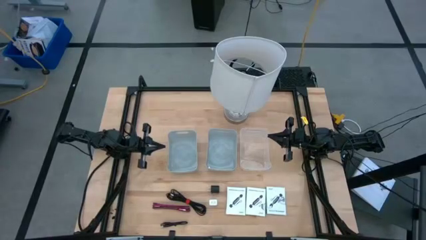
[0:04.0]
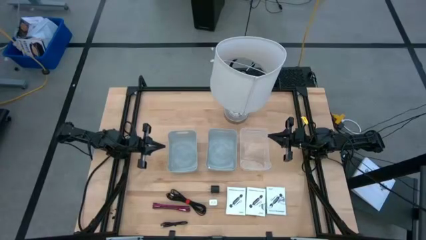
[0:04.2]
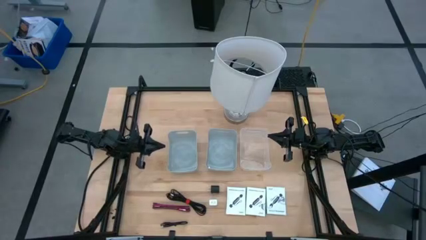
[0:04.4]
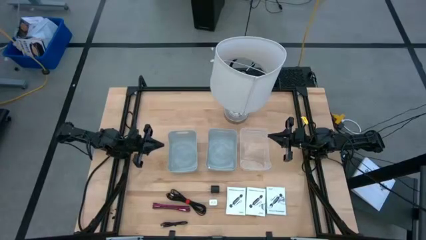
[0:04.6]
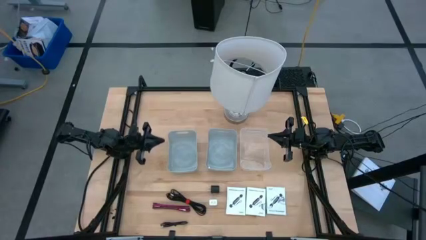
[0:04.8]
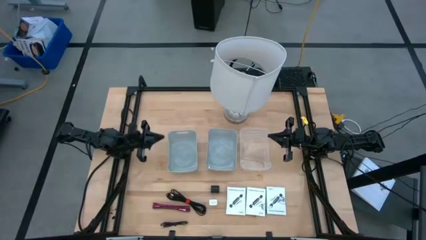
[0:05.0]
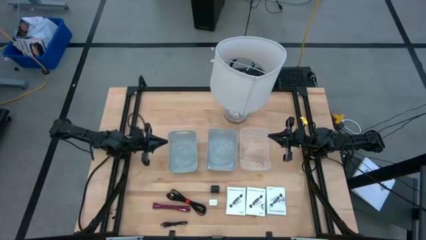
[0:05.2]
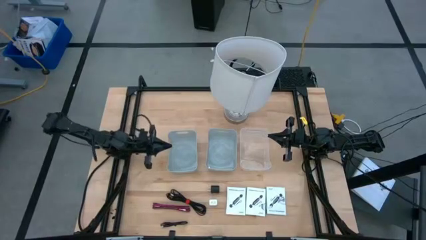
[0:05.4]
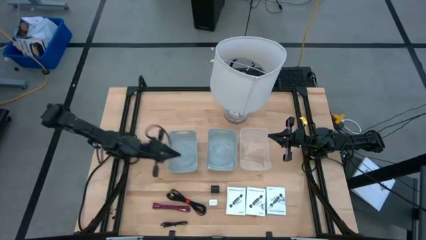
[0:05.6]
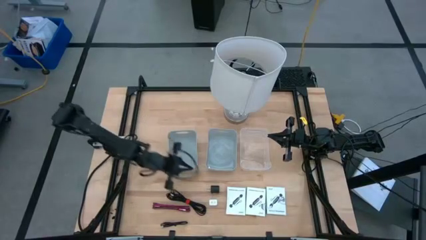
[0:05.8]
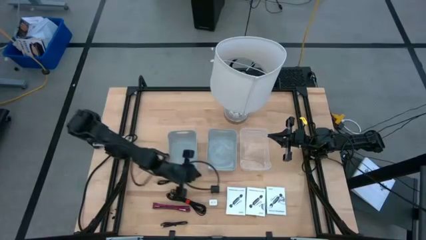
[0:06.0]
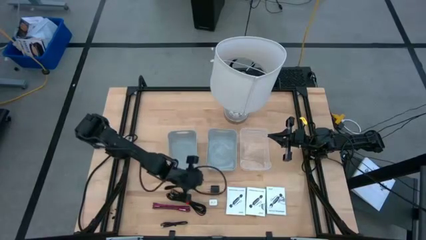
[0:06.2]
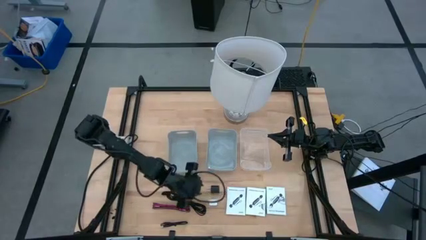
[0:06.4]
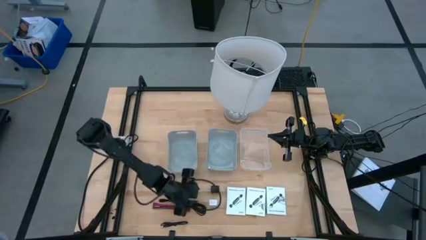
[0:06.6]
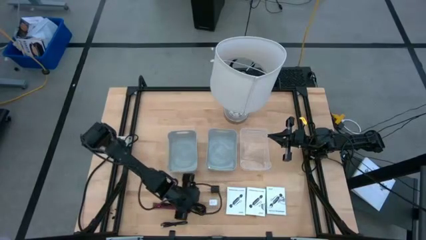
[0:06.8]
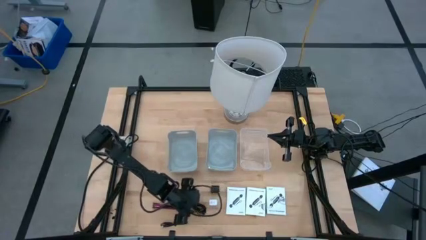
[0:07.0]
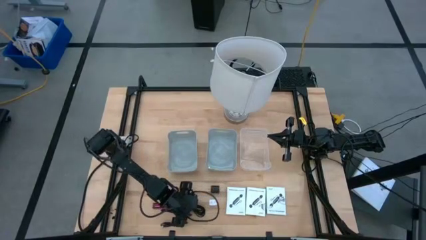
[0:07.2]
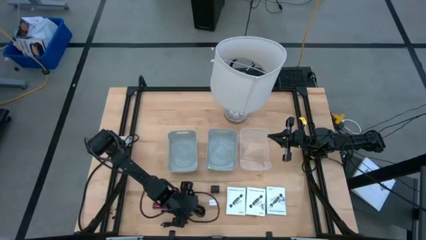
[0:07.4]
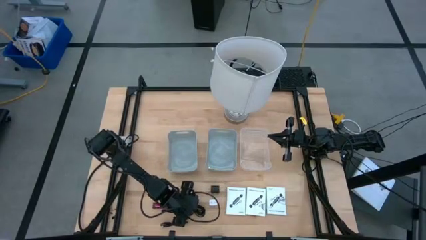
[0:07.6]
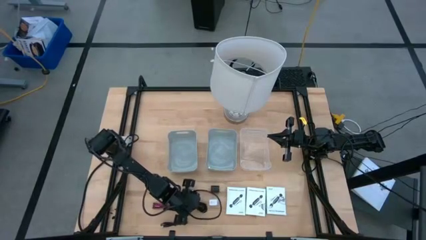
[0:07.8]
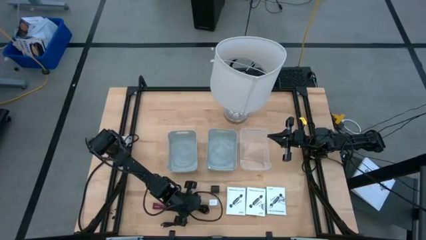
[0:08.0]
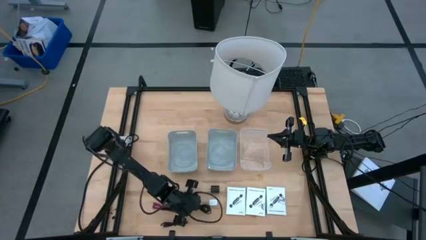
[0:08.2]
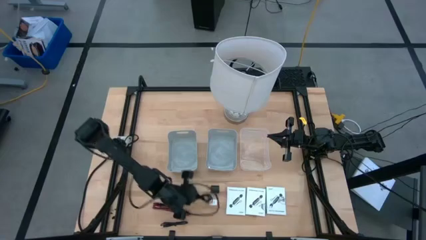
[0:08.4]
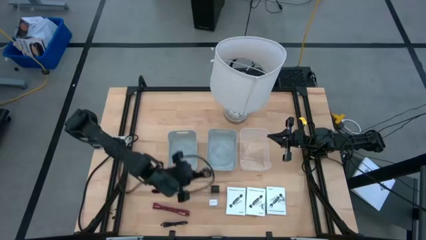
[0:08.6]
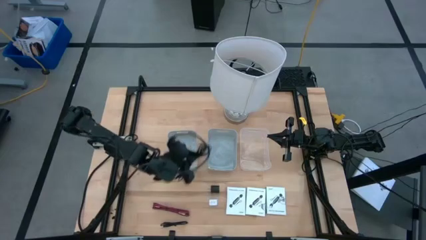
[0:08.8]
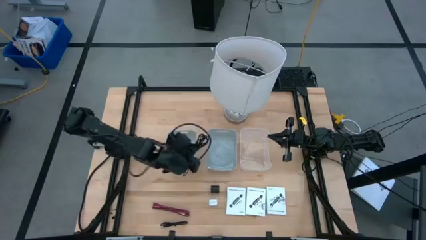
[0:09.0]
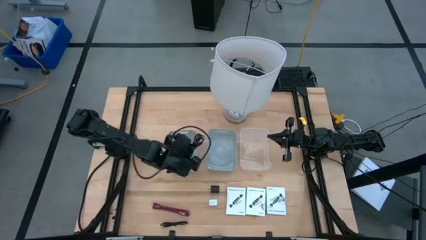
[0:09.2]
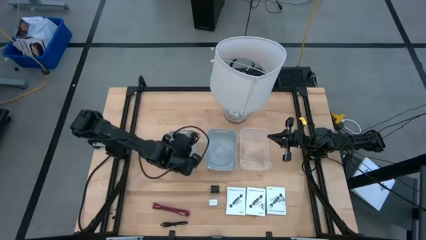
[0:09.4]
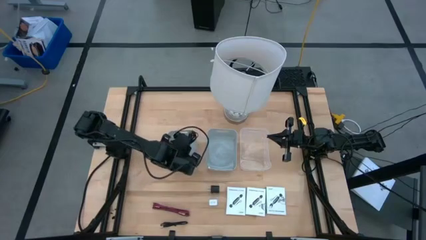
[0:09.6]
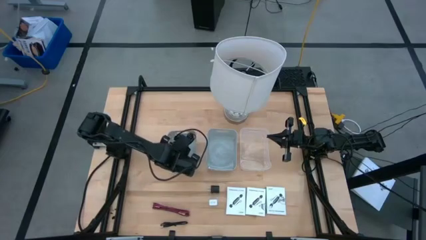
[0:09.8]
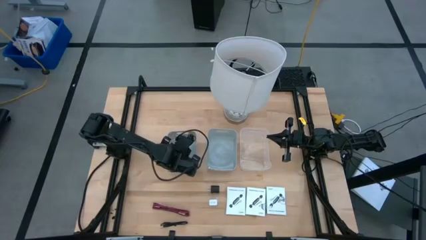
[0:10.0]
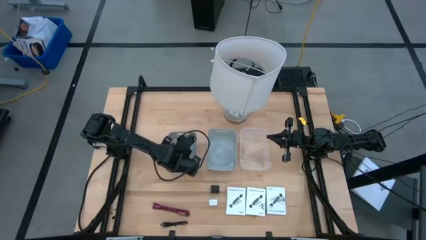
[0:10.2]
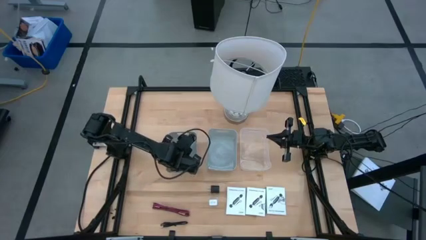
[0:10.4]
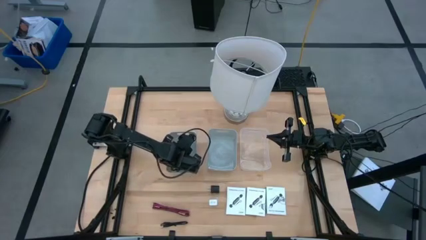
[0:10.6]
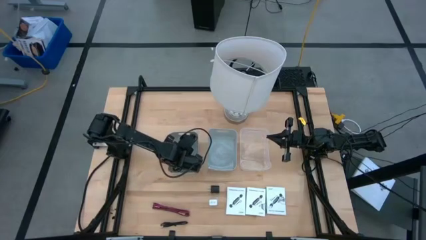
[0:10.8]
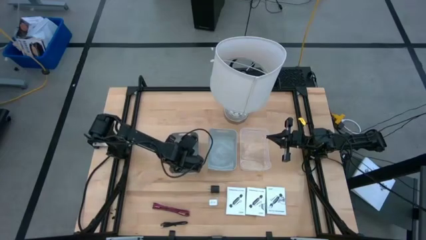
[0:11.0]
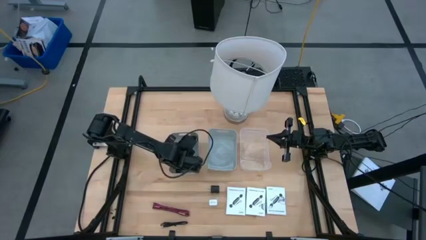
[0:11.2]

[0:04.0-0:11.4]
Task: Pick and place items into bin
Put the top black charger cable into the left gray bin

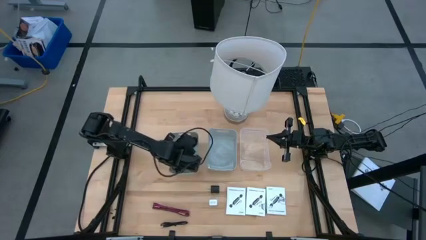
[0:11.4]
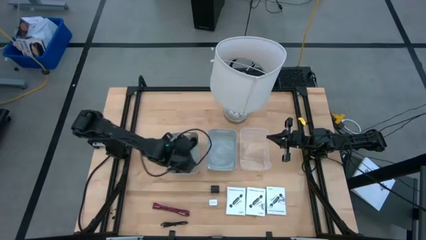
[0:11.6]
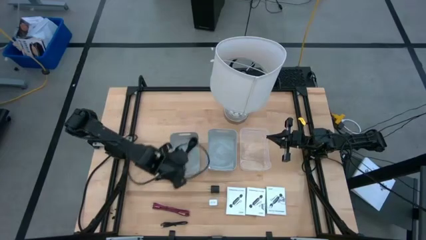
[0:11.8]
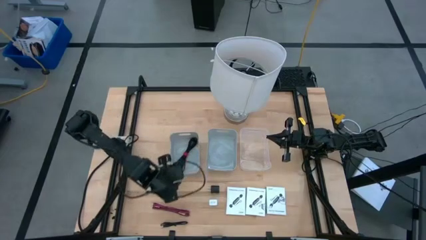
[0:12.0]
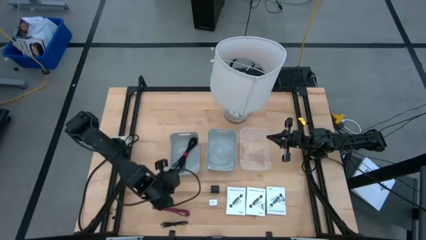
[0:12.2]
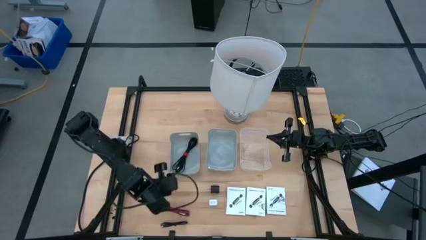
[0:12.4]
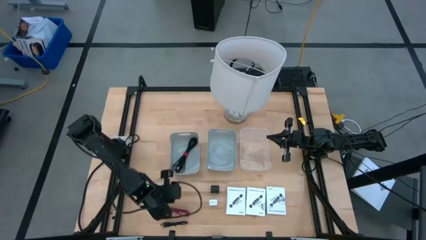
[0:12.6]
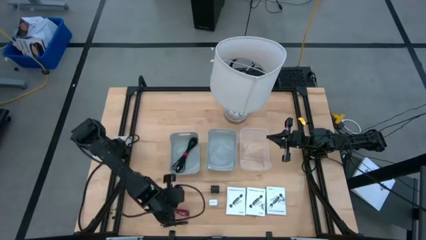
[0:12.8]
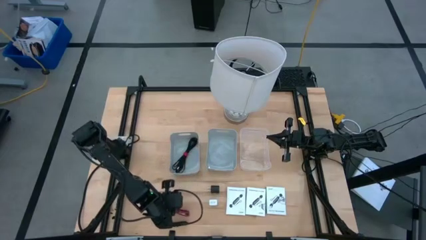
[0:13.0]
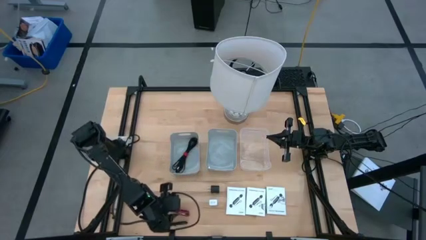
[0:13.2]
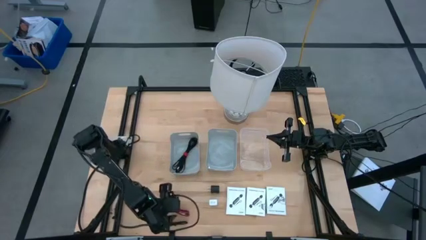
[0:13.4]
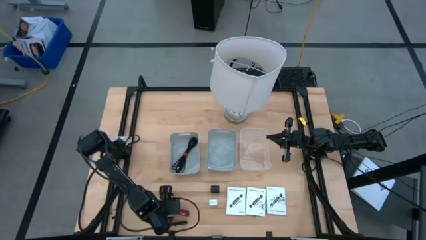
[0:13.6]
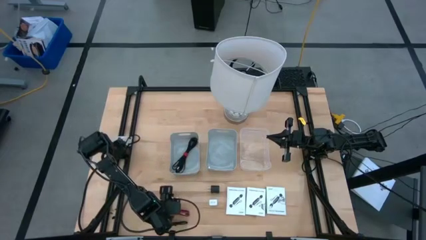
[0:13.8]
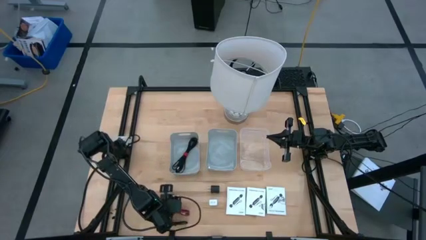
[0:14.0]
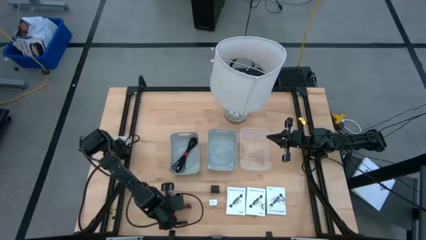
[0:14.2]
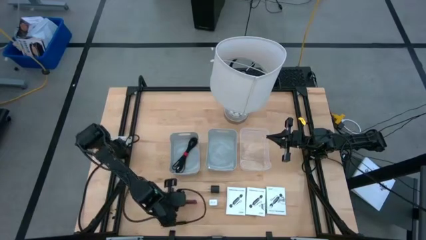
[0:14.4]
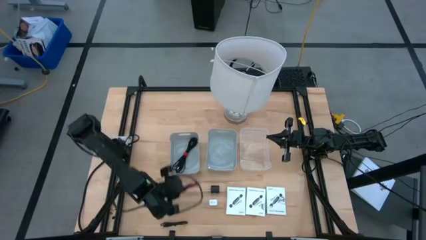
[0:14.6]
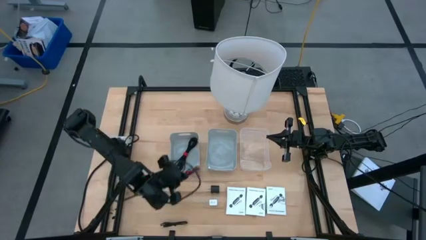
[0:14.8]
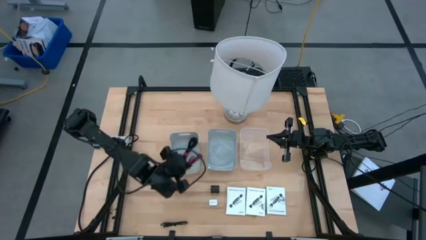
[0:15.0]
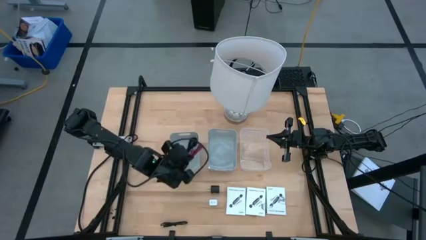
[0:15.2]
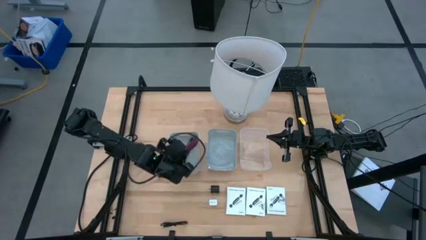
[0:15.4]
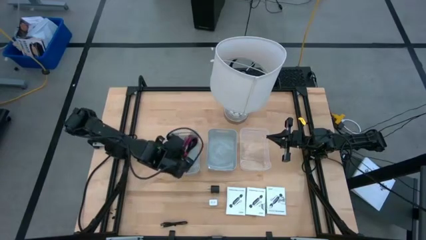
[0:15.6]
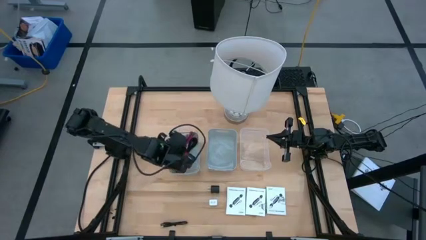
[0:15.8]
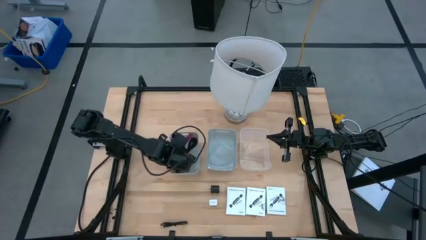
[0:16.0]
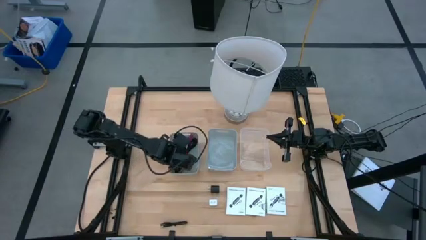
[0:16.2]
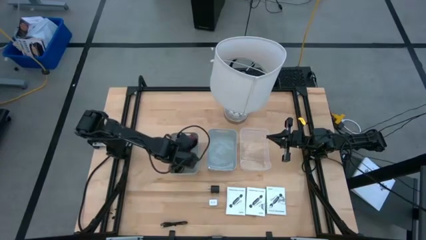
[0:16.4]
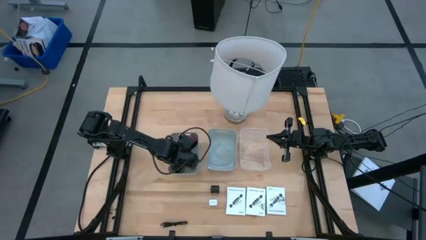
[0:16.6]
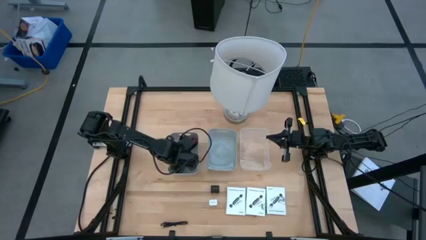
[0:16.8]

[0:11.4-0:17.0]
Put the pink charger cable into the left gray bin

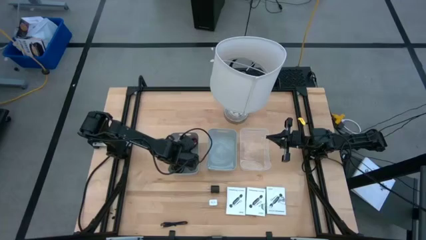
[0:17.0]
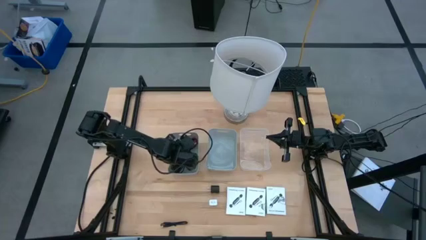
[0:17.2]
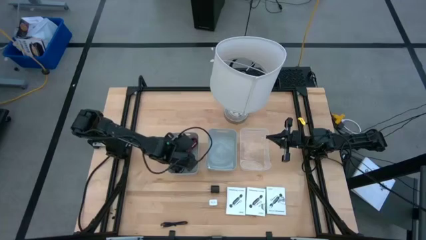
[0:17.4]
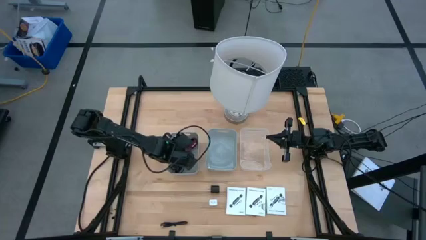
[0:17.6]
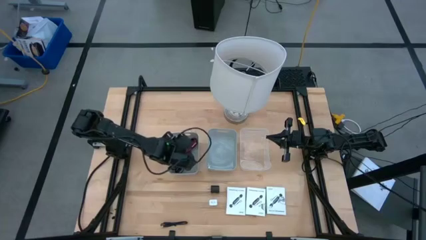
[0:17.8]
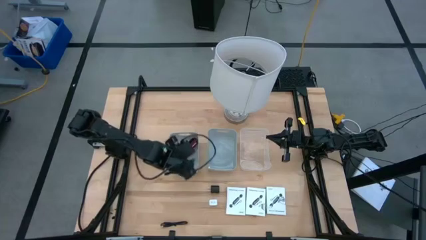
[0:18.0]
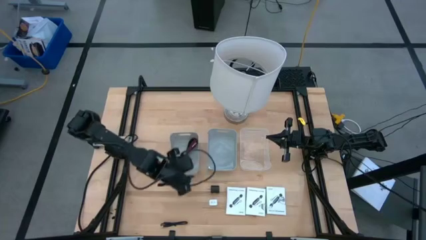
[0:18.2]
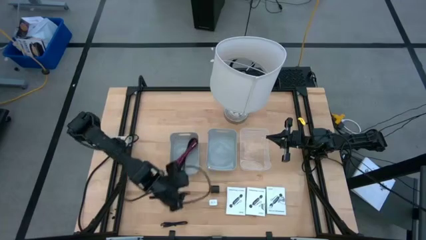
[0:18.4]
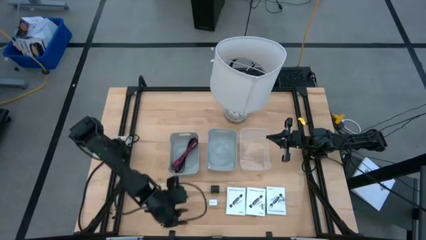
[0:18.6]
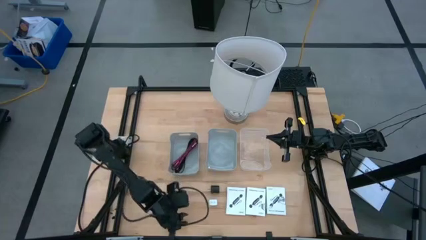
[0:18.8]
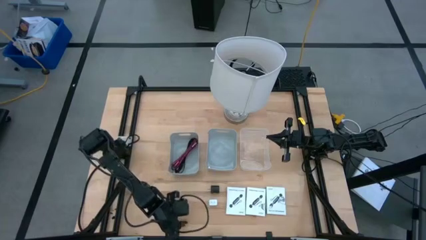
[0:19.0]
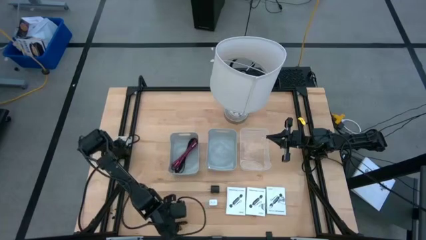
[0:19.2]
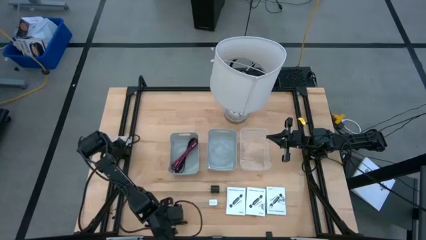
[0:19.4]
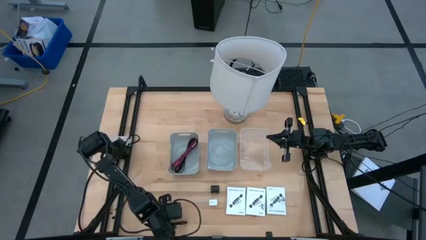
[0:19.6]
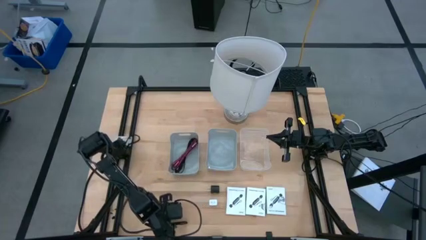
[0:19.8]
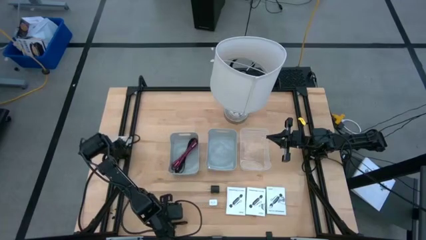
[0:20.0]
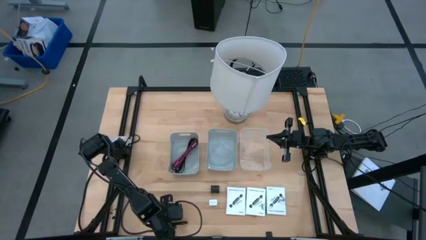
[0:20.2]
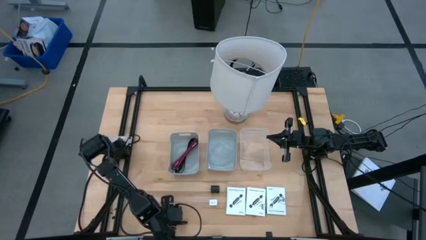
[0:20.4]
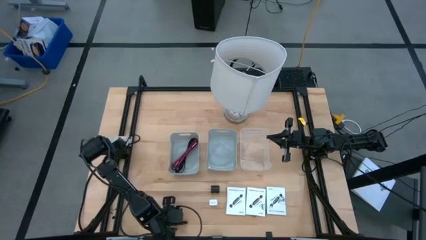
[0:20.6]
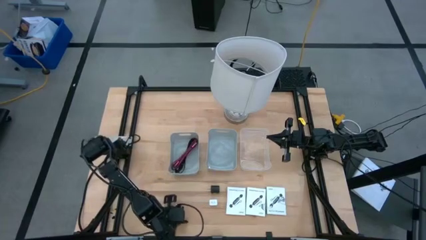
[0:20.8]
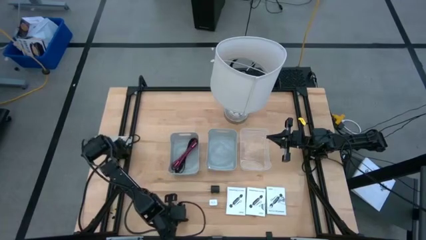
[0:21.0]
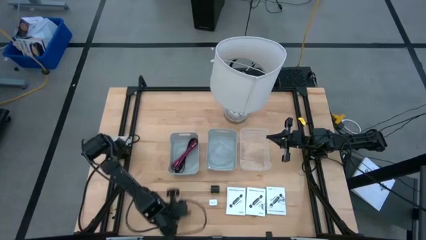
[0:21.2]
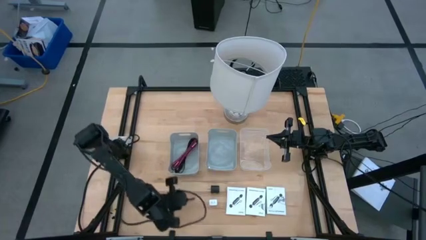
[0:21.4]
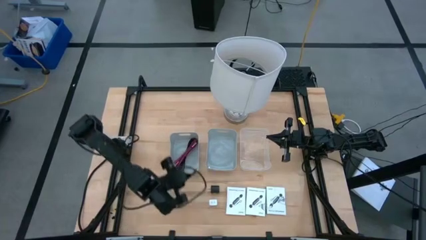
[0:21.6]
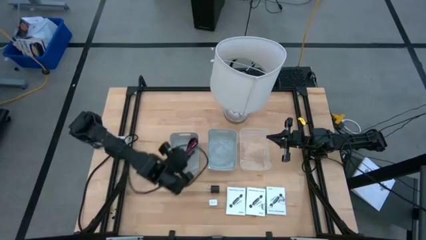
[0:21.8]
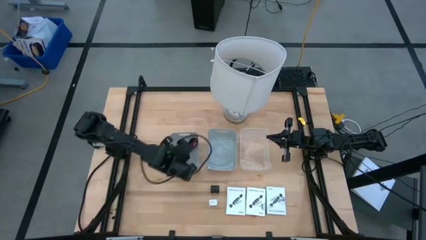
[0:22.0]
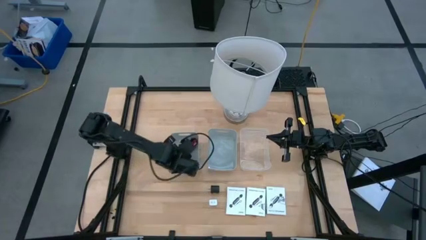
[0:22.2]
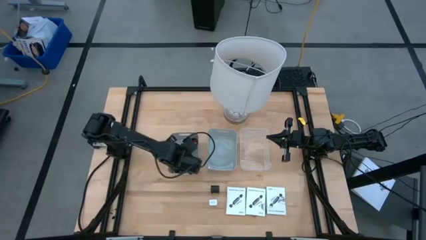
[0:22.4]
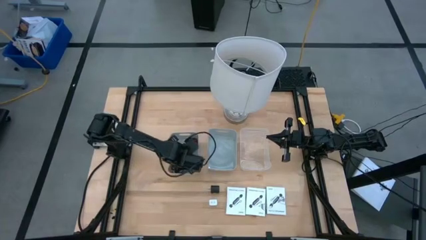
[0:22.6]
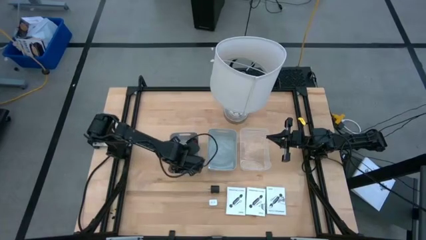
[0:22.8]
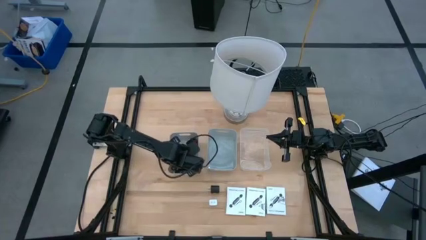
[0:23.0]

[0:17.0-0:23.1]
Put the black charger cable into the left gray bin
